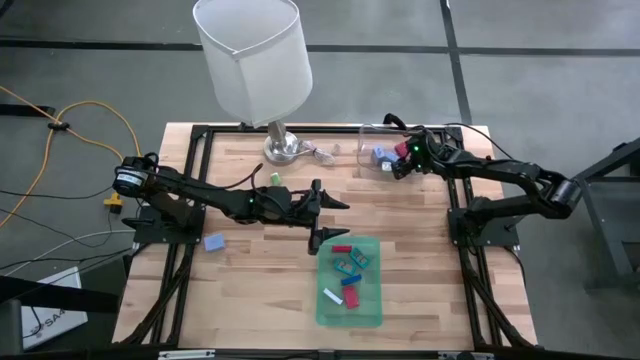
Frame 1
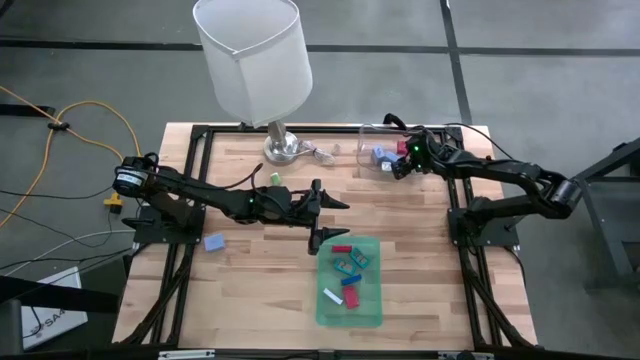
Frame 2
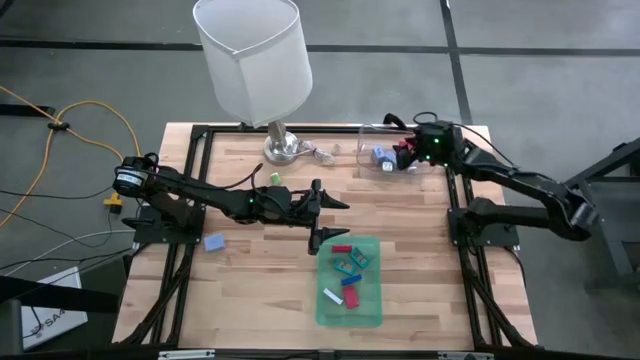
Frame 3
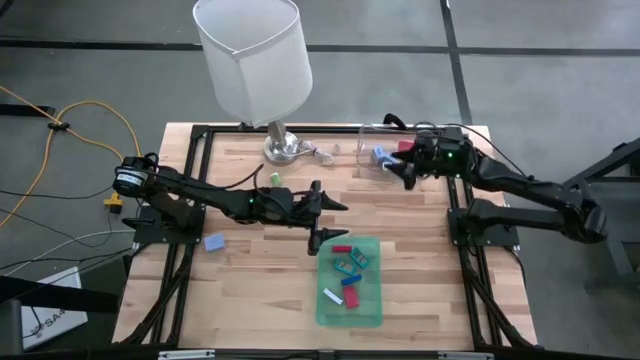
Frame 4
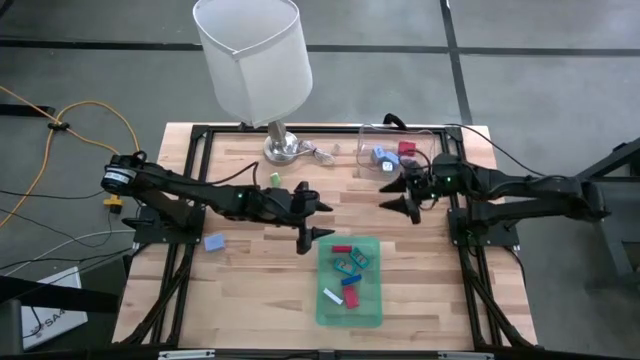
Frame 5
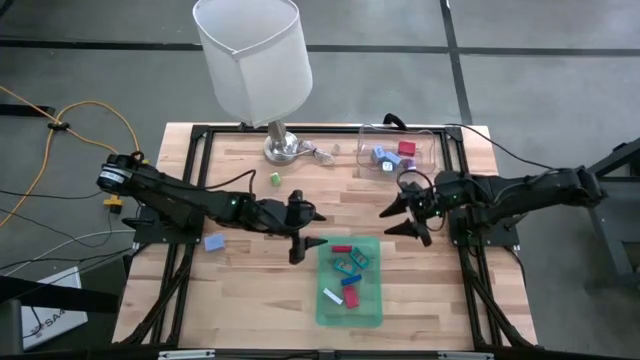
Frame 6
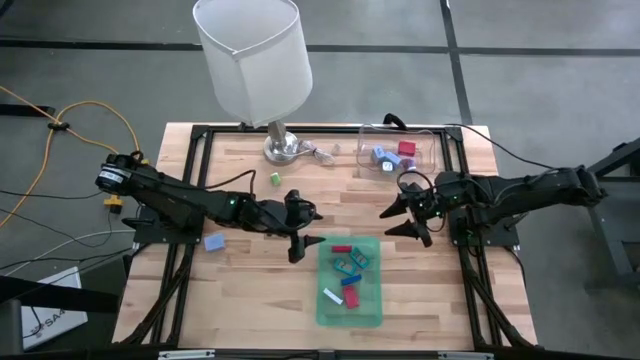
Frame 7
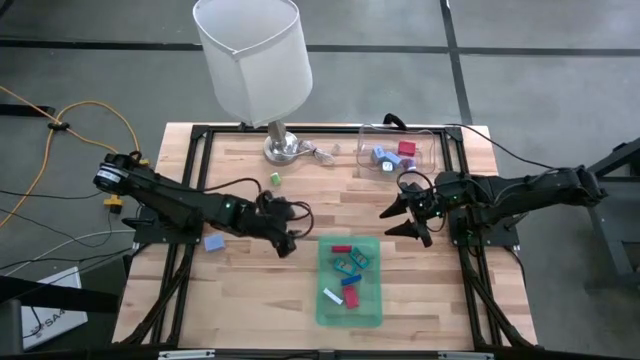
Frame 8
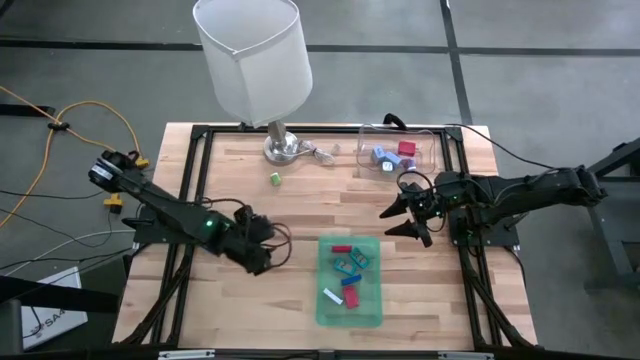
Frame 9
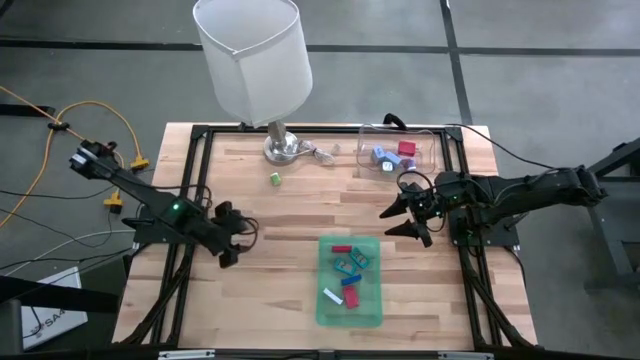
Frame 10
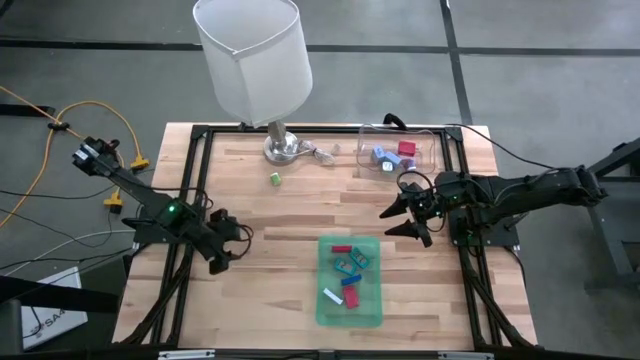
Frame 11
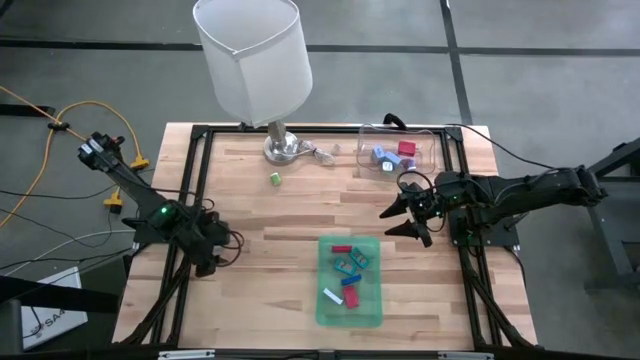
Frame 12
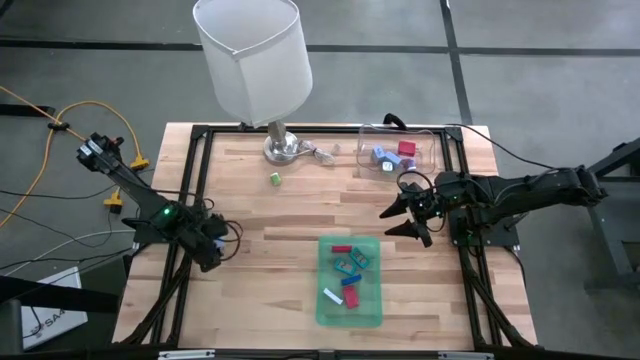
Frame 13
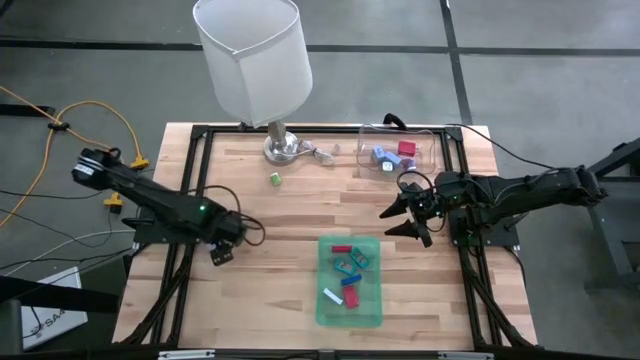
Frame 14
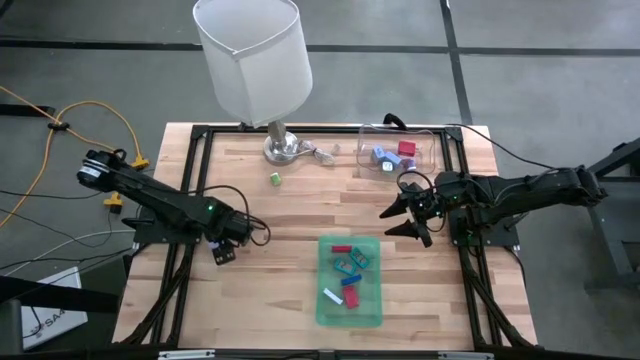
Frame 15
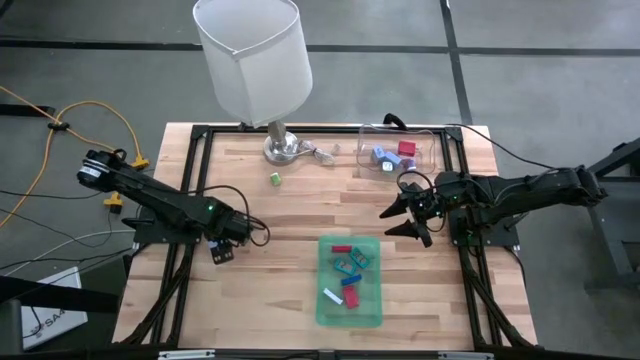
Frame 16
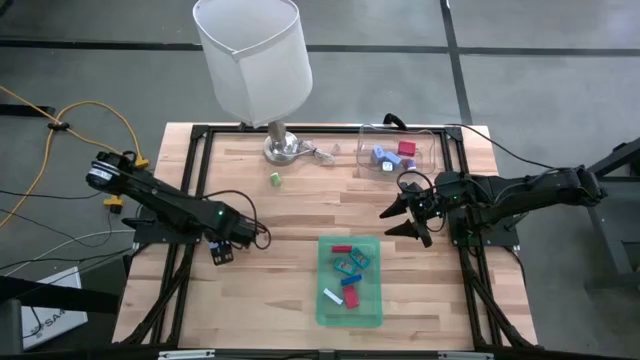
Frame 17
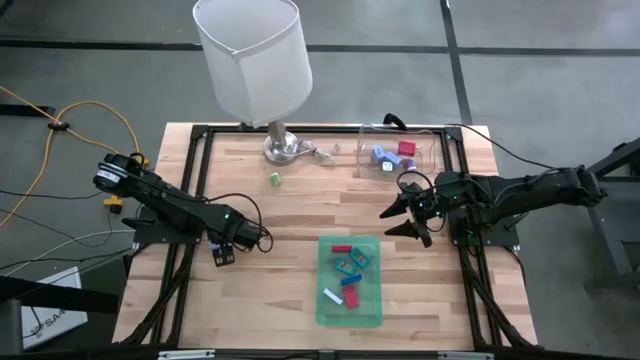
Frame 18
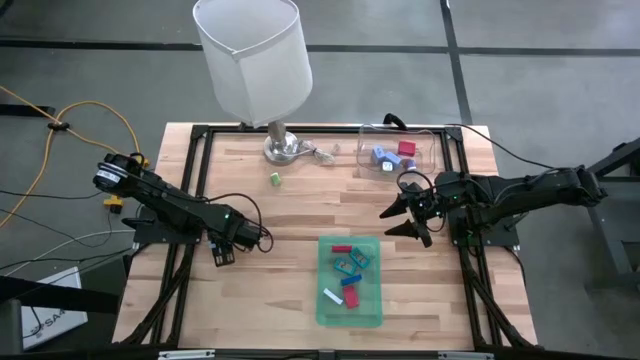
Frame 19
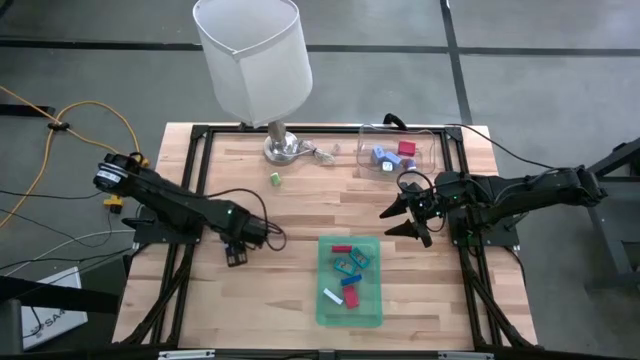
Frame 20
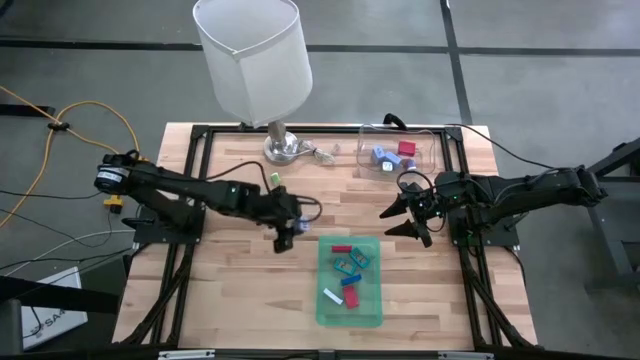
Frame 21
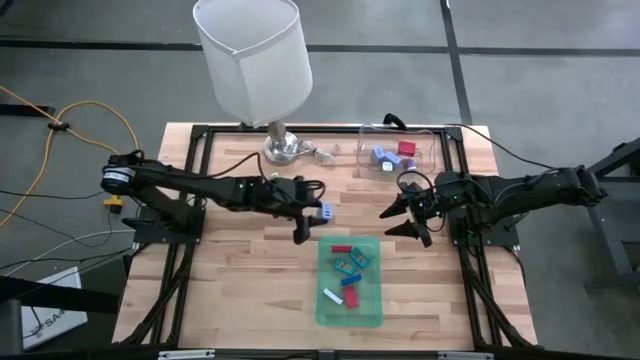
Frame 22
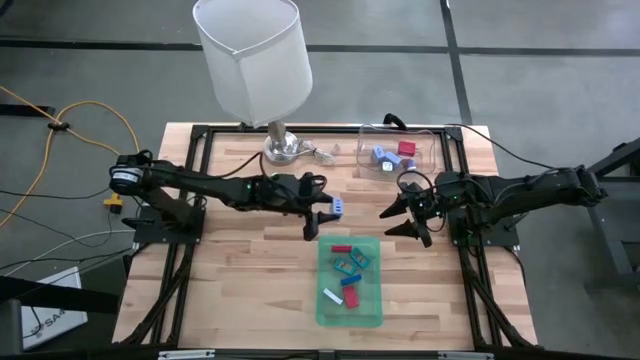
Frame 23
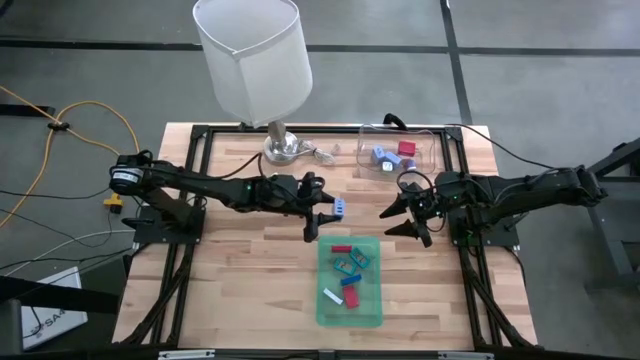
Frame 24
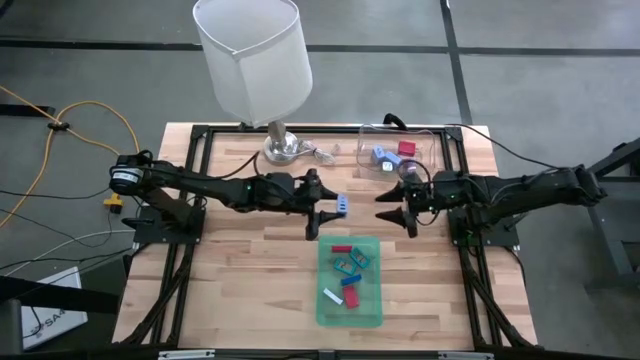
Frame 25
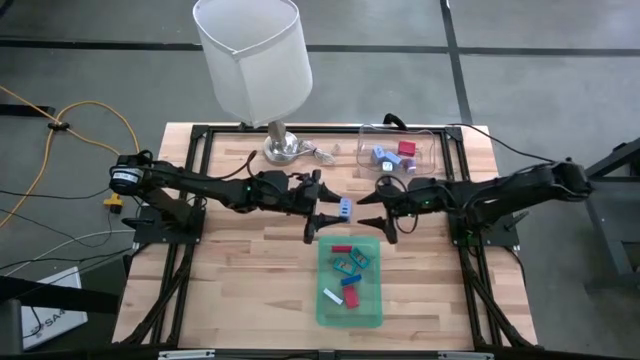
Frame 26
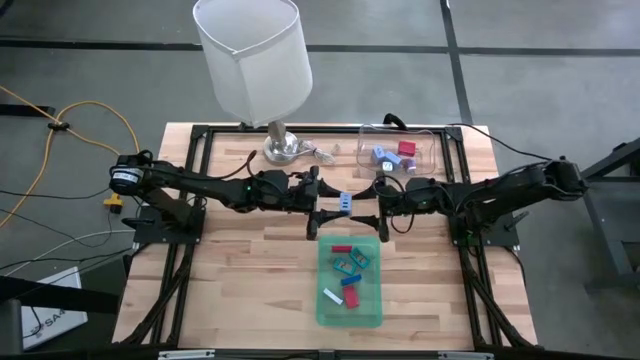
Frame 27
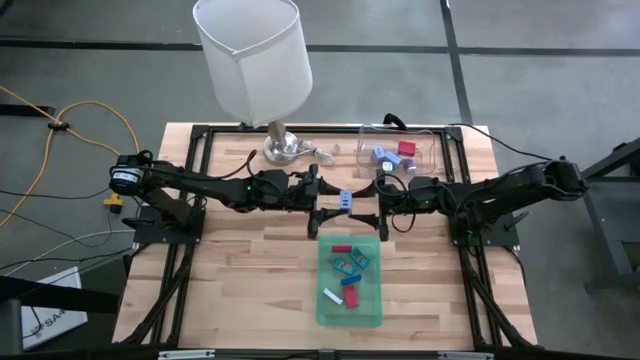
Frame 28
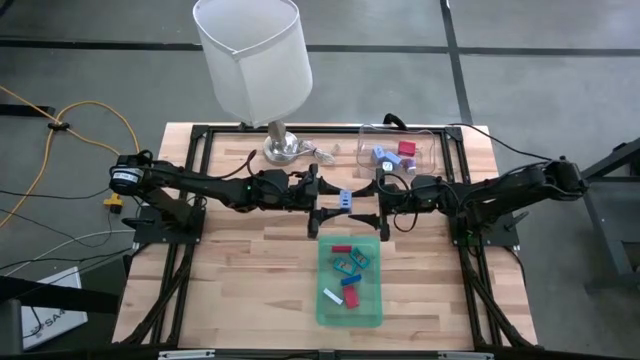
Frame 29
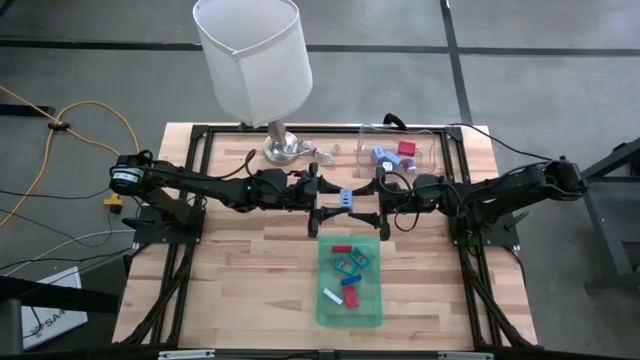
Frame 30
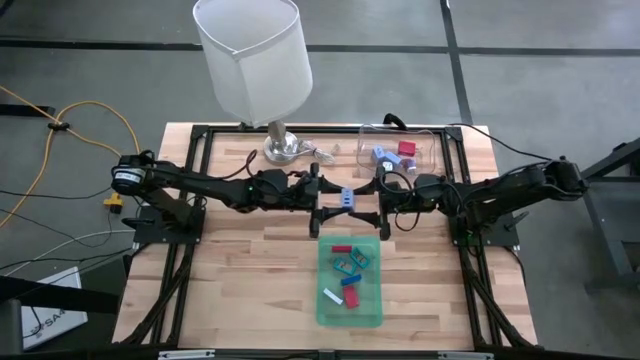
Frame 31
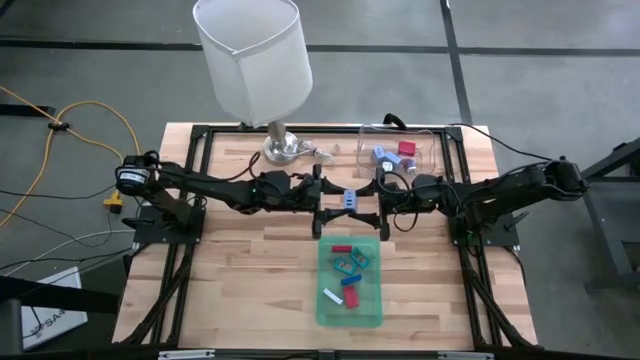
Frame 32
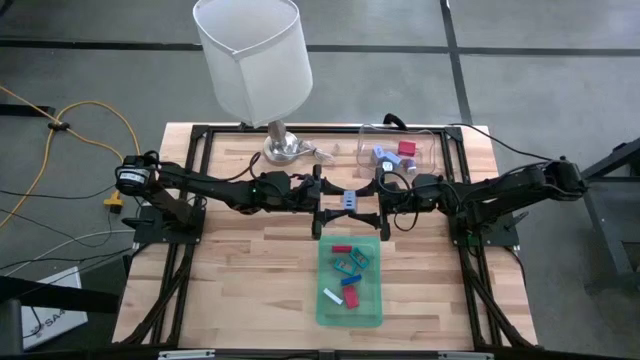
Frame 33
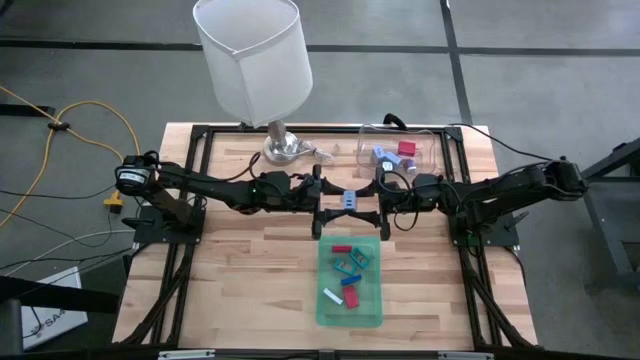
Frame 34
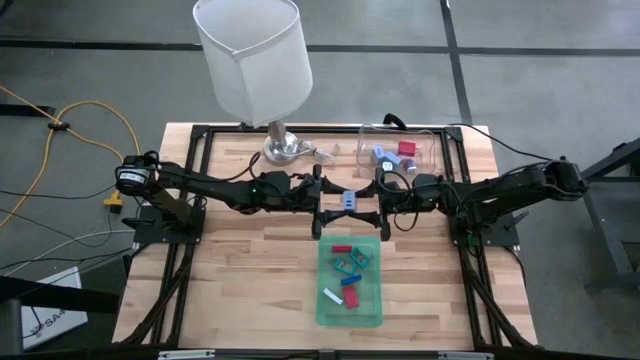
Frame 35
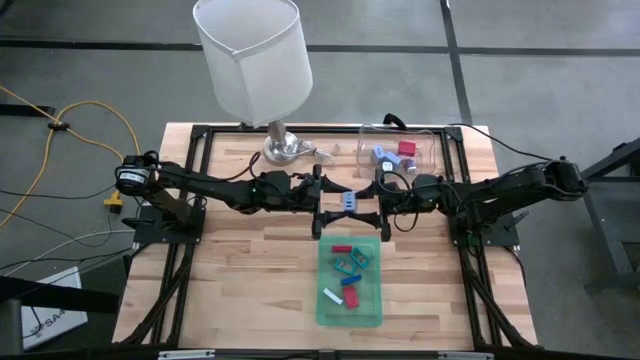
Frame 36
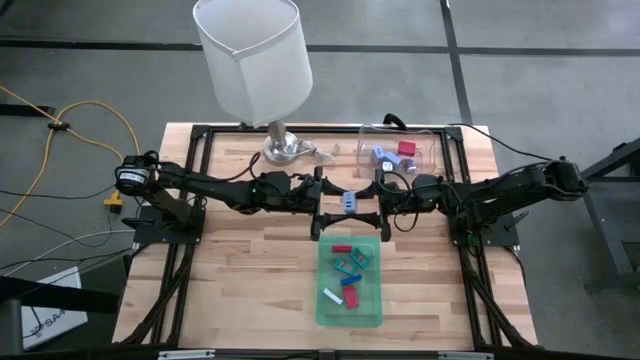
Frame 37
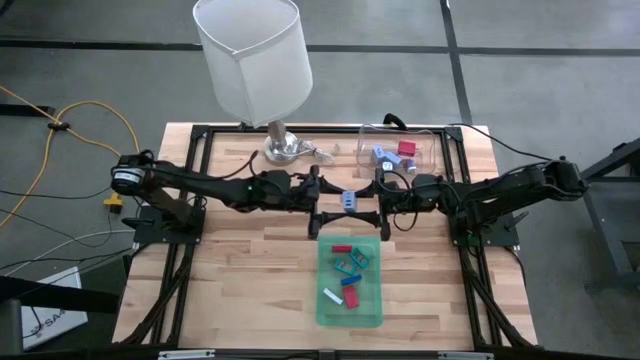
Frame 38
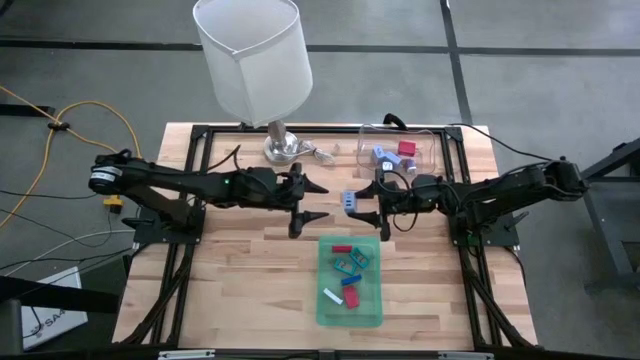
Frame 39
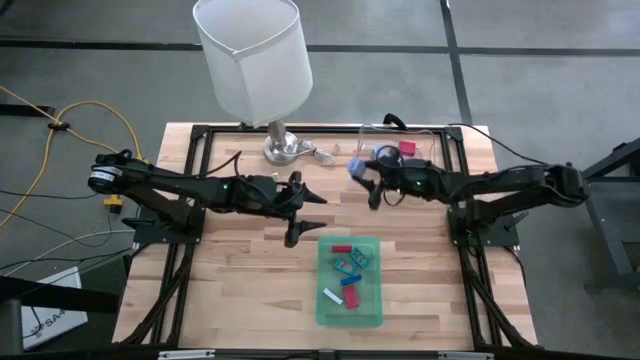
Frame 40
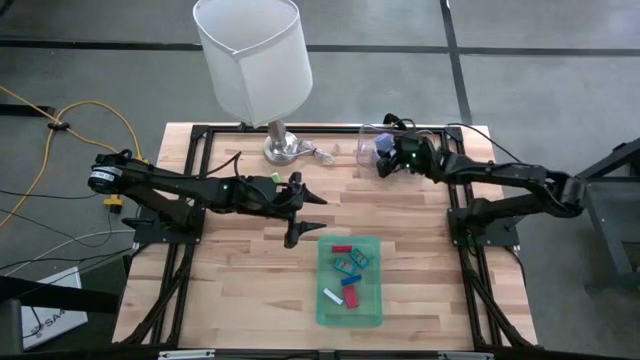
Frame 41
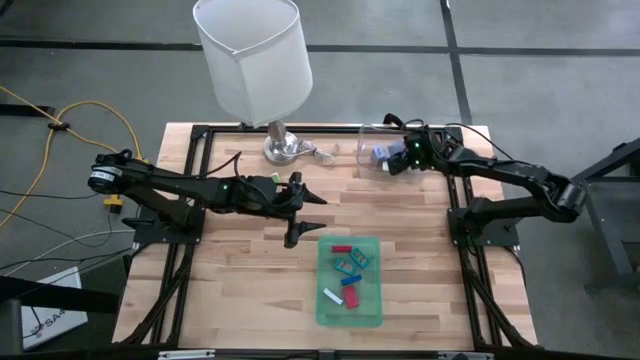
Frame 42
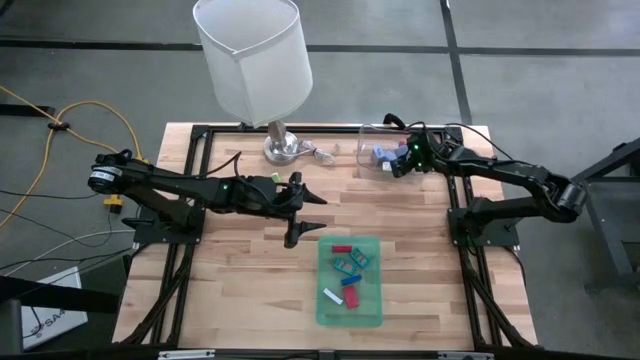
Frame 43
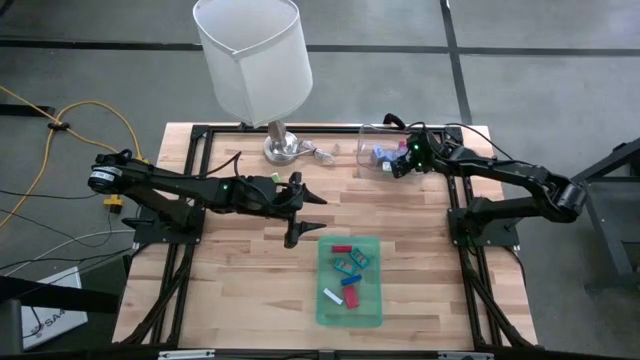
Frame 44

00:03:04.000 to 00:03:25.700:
Task: Pick & Place Office items
Put the purple charger adapter into the transparent bin
